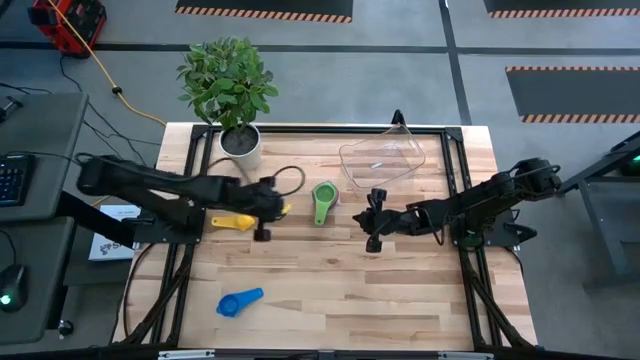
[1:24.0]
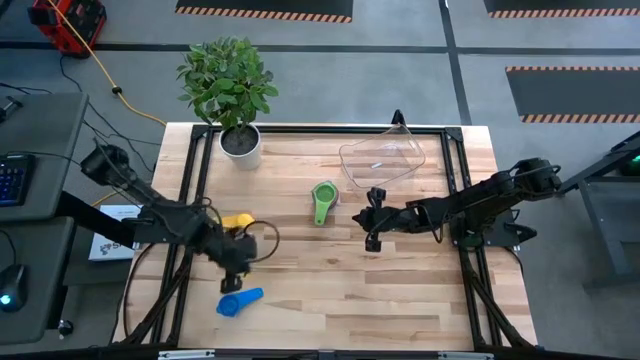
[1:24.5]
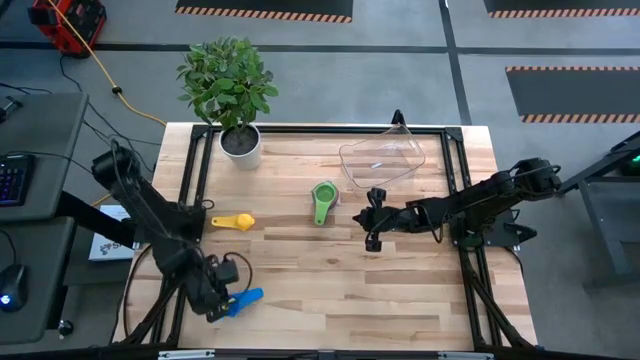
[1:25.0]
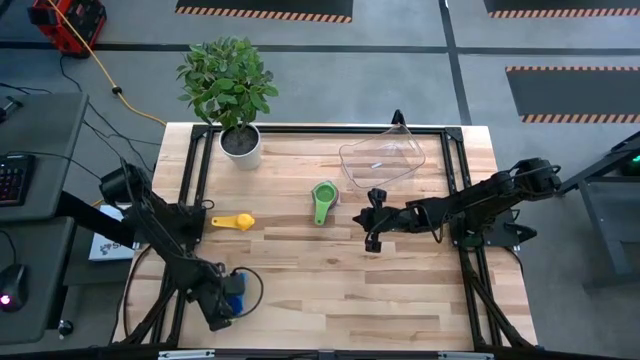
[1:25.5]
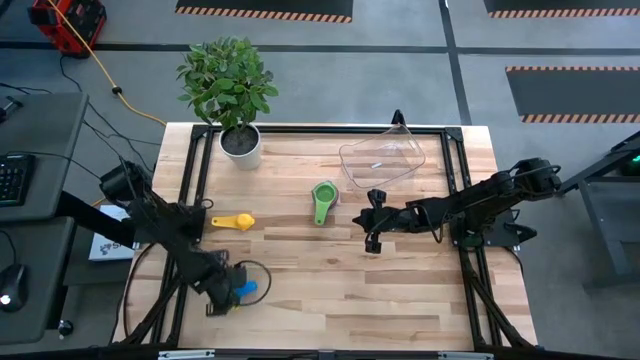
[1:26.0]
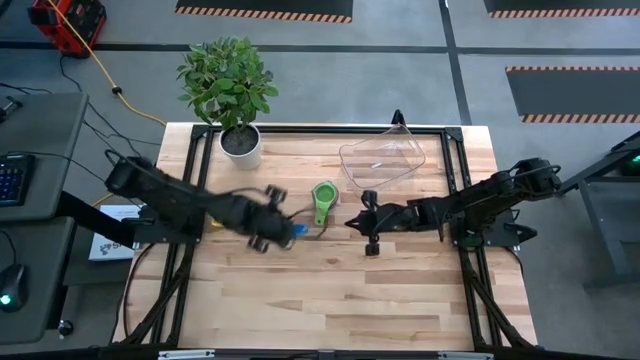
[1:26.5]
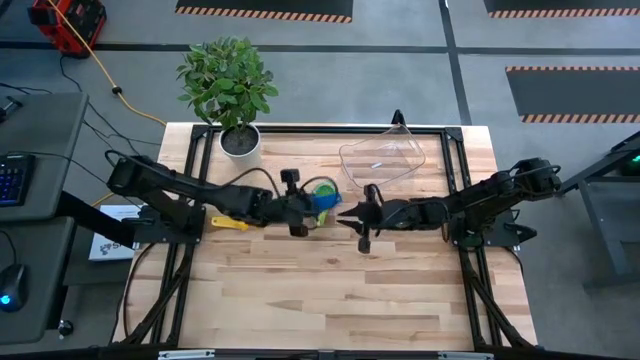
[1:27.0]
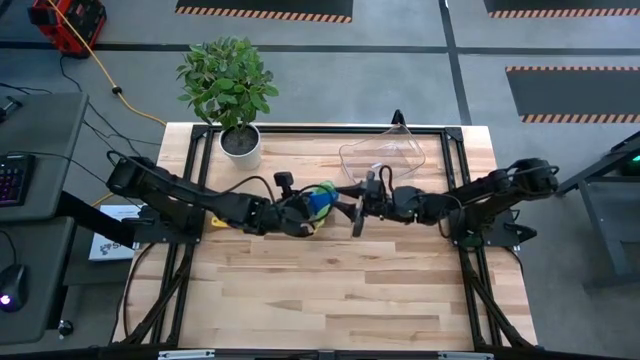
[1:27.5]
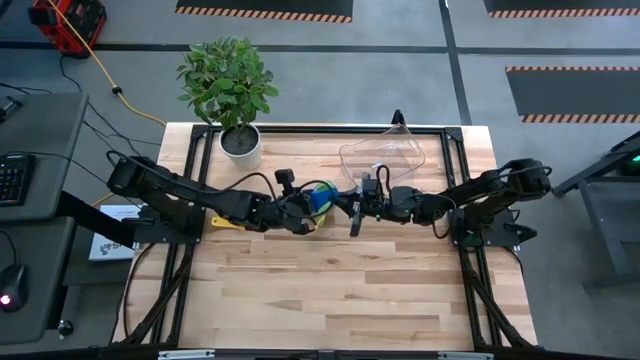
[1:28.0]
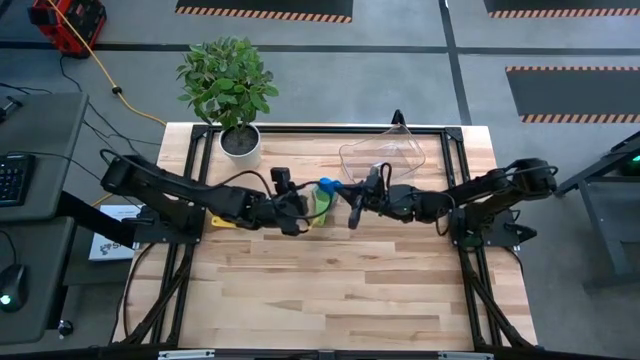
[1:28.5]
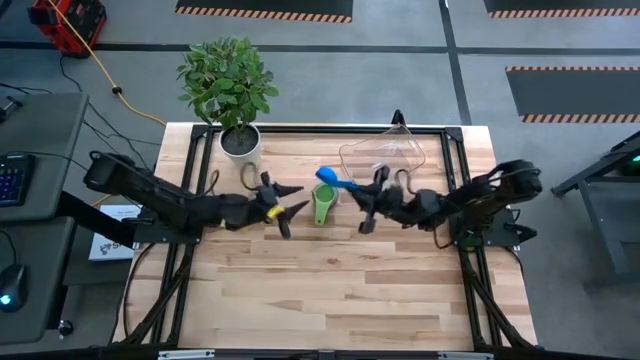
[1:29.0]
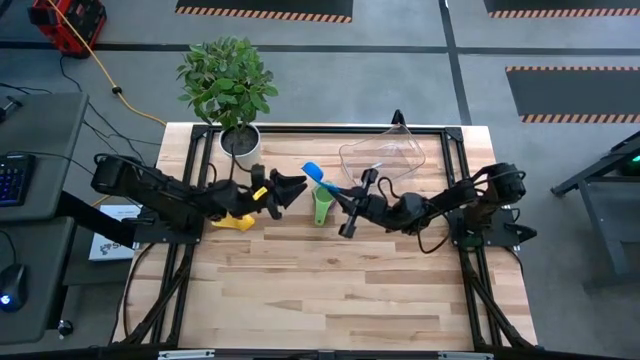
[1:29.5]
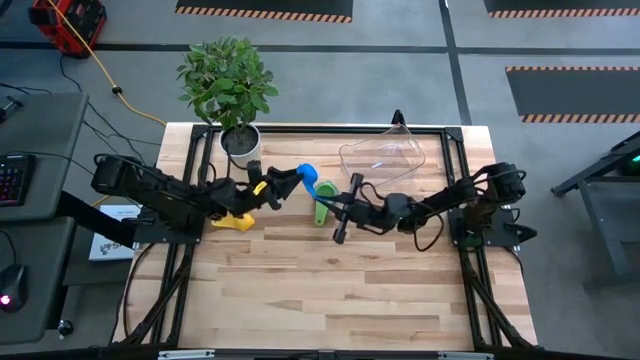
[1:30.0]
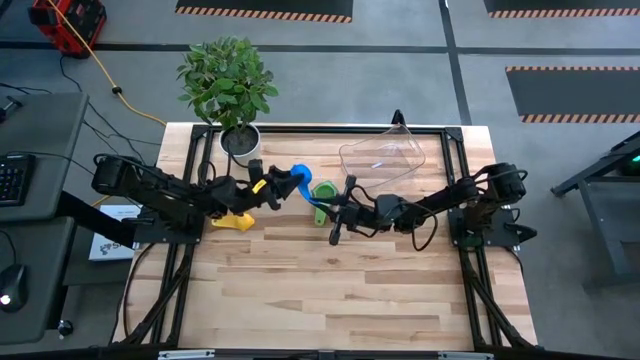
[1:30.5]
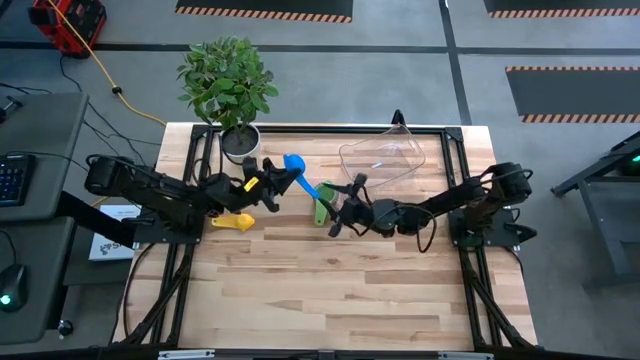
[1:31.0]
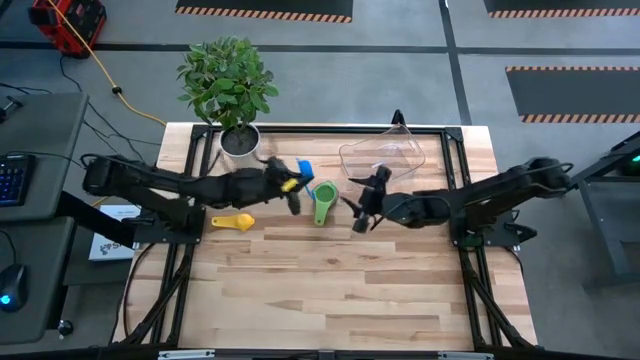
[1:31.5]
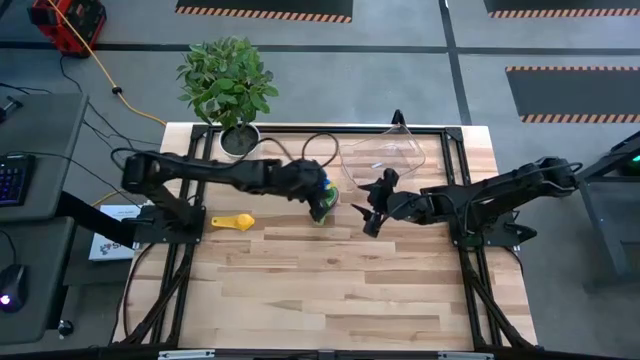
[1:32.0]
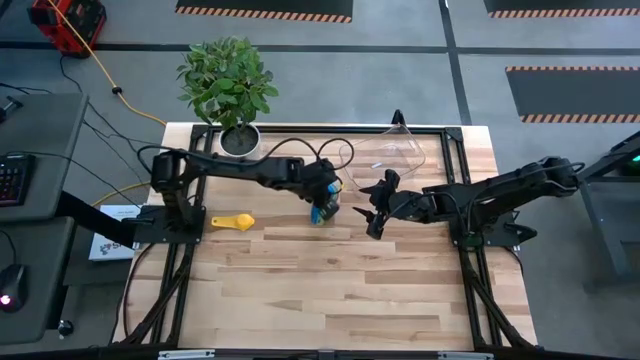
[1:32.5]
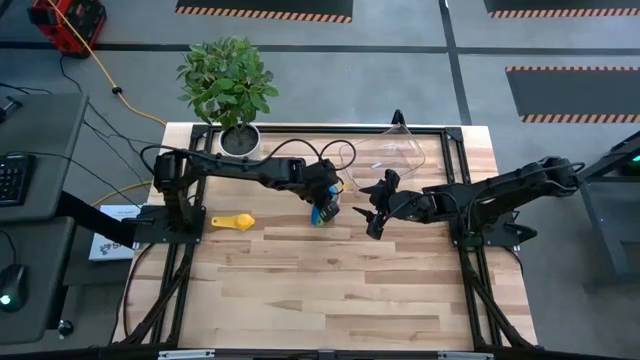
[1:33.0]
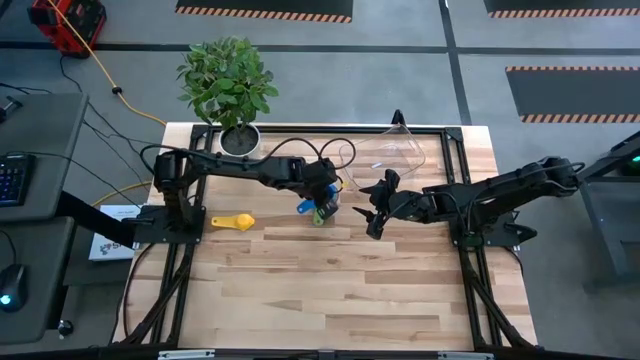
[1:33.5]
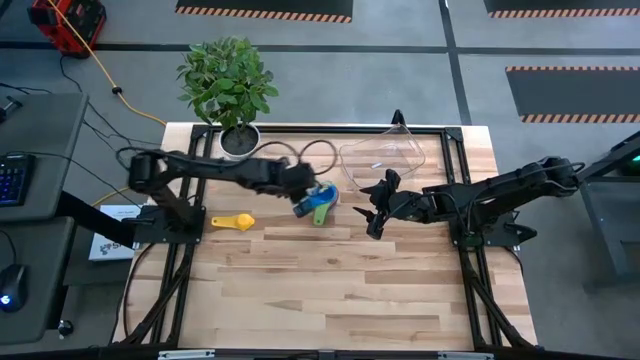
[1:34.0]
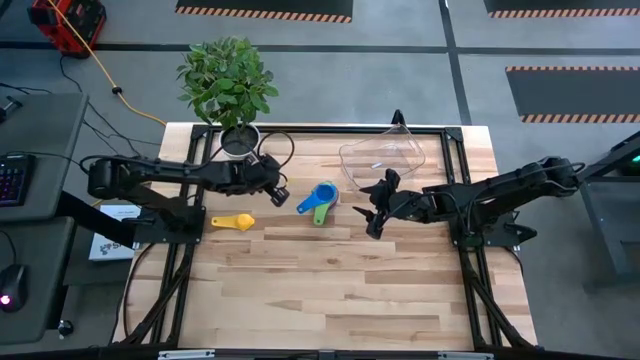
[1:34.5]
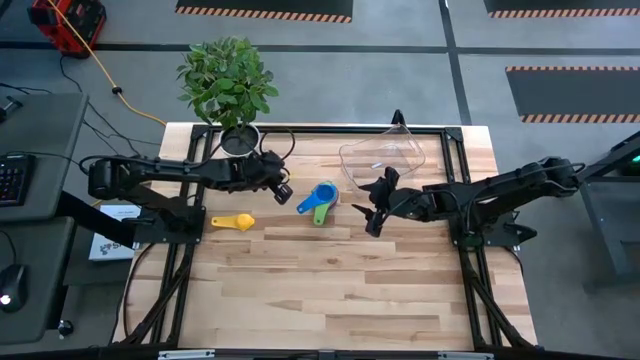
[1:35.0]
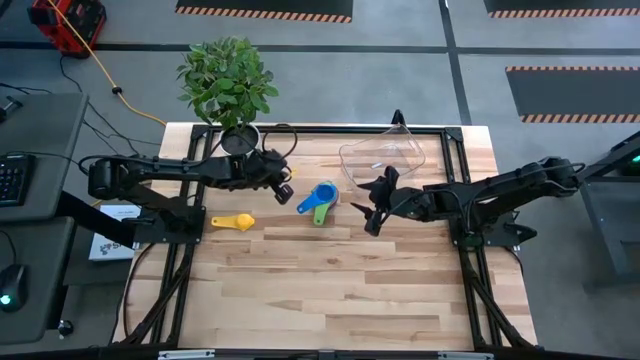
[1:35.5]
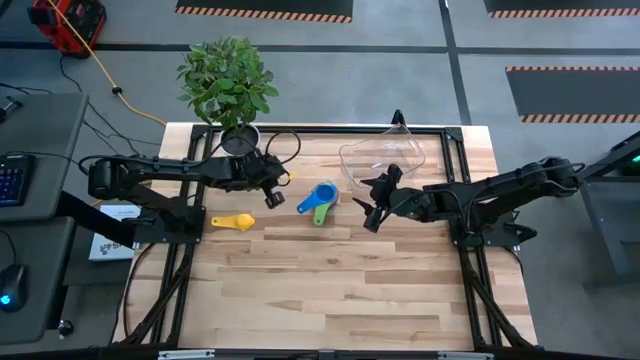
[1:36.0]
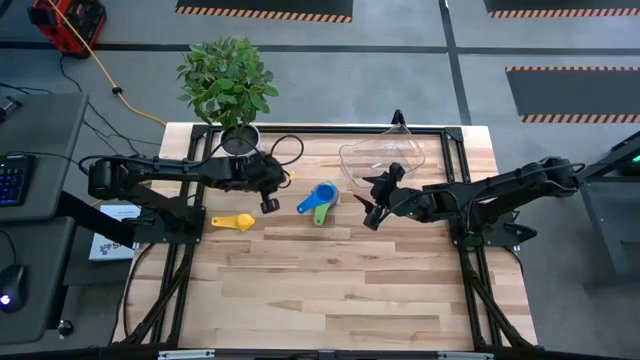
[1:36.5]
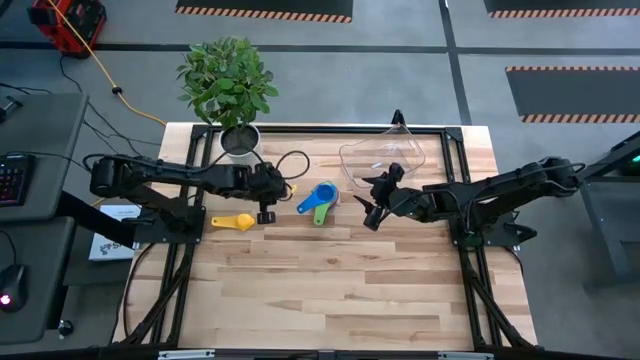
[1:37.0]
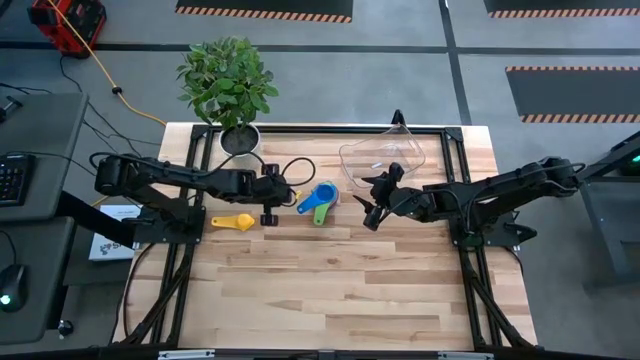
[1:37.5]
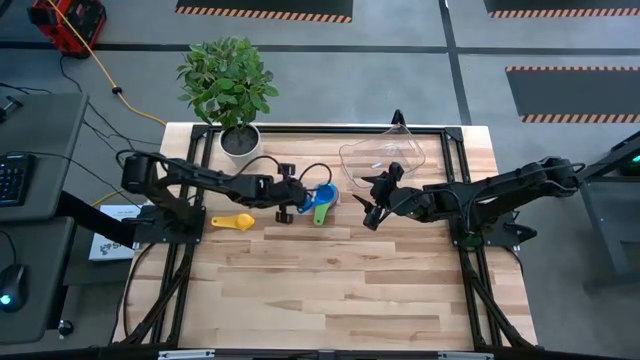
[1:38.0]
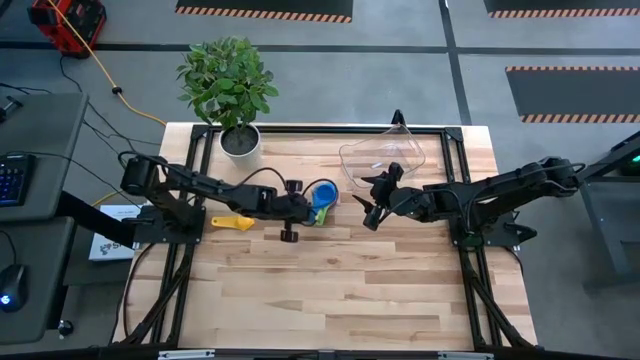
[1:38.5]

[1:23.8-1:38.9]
Task: Nest measuring cups in basket
Stack the blue measuring cup on top of the green measuring cup

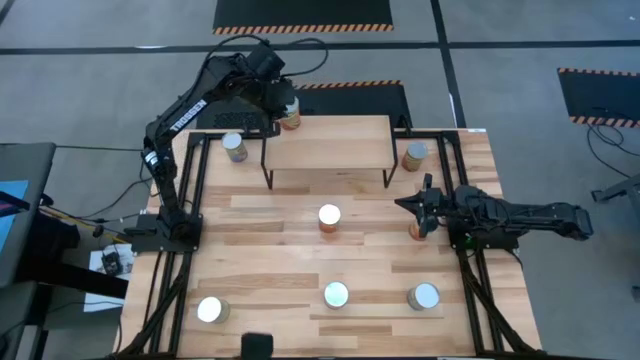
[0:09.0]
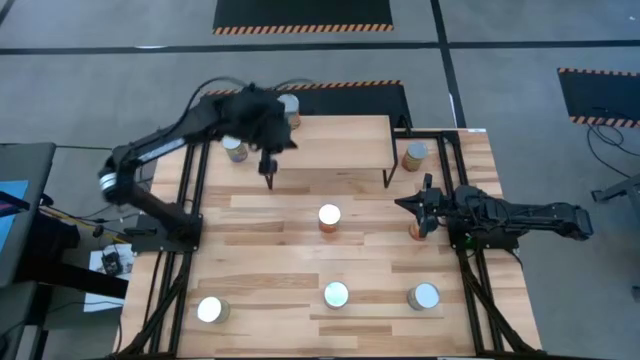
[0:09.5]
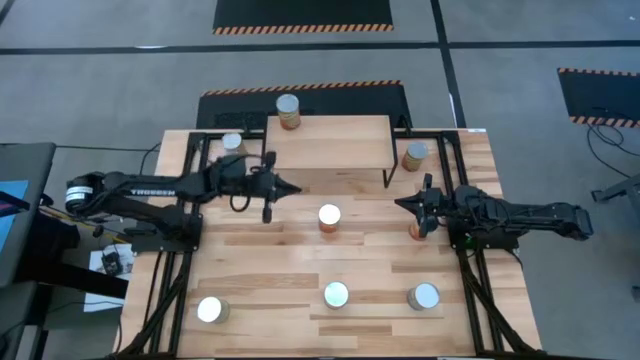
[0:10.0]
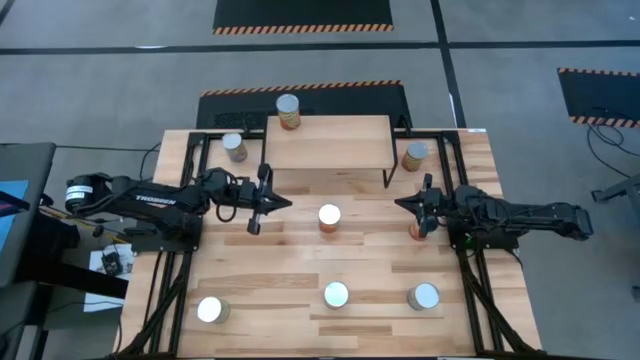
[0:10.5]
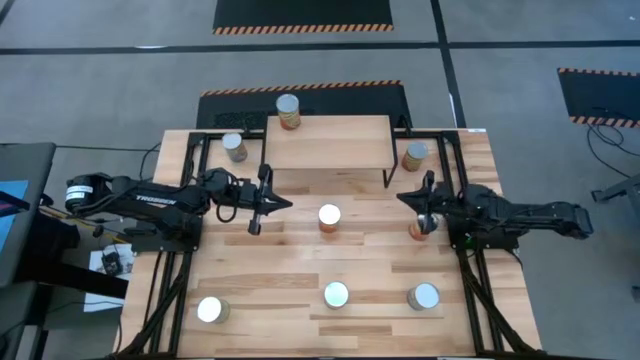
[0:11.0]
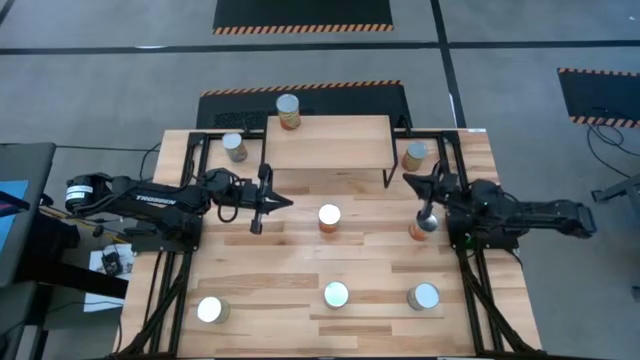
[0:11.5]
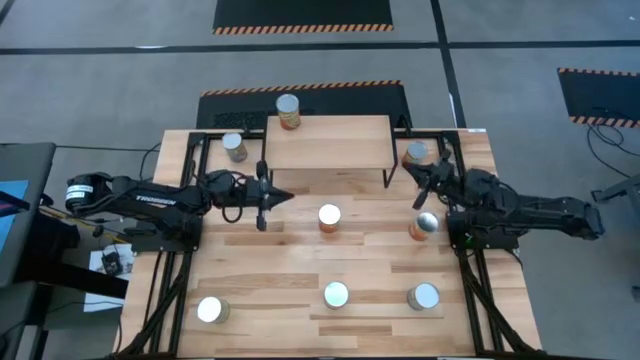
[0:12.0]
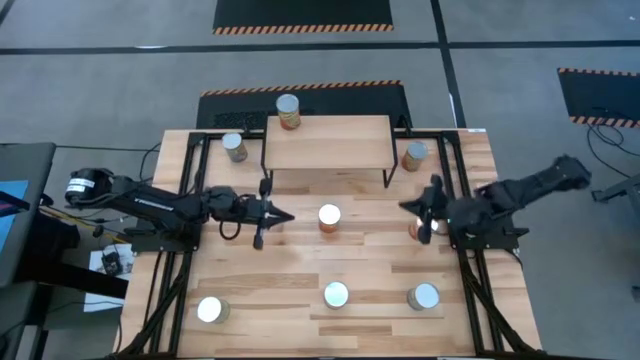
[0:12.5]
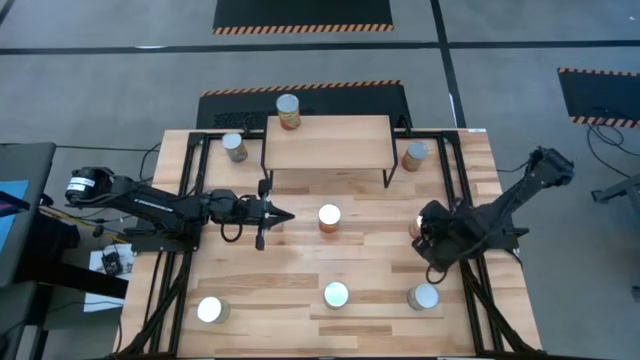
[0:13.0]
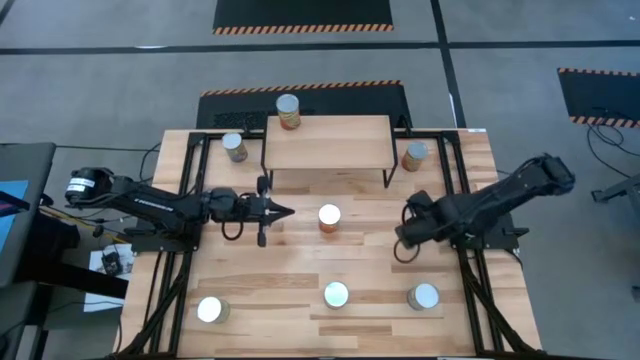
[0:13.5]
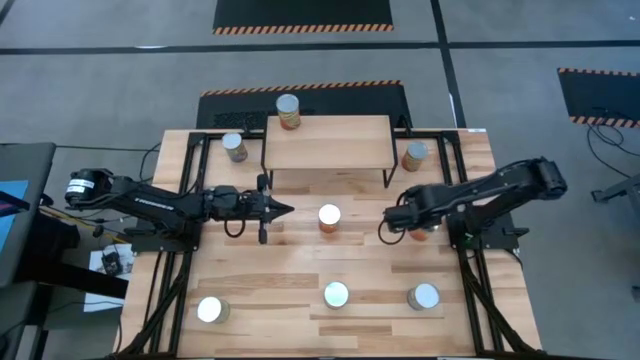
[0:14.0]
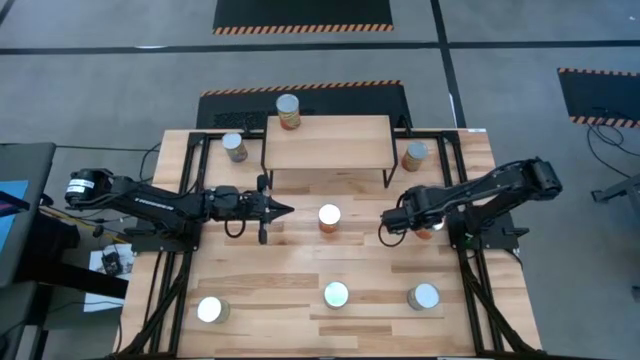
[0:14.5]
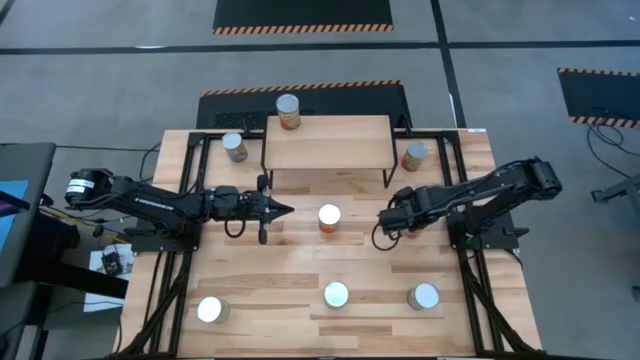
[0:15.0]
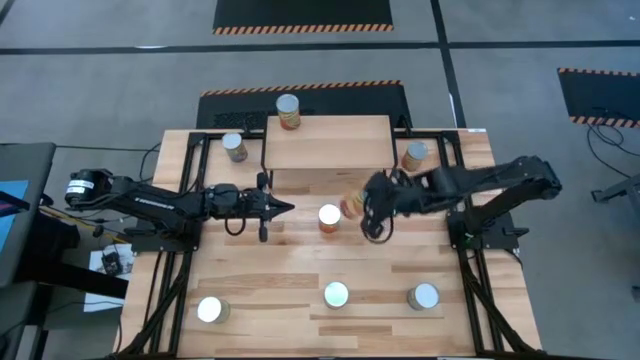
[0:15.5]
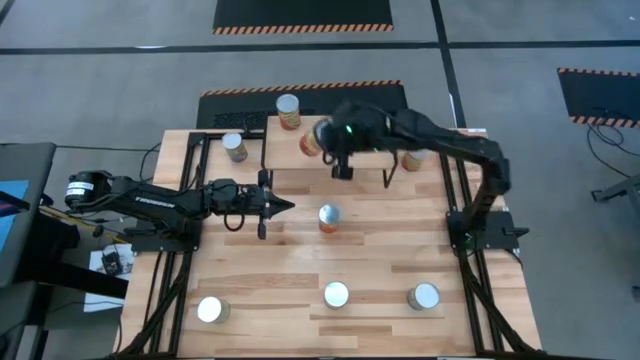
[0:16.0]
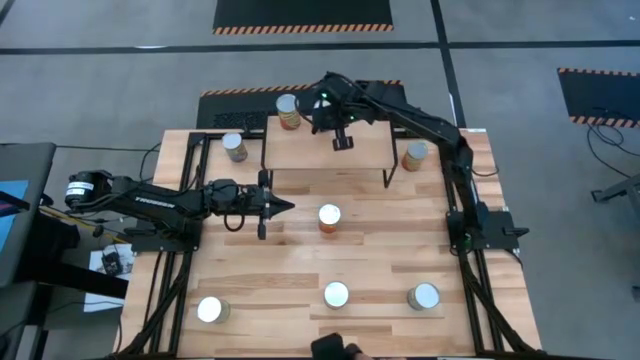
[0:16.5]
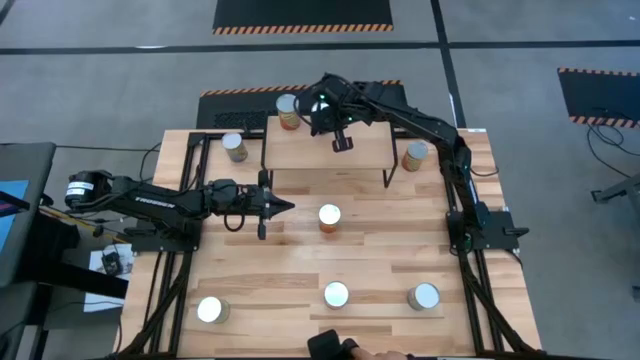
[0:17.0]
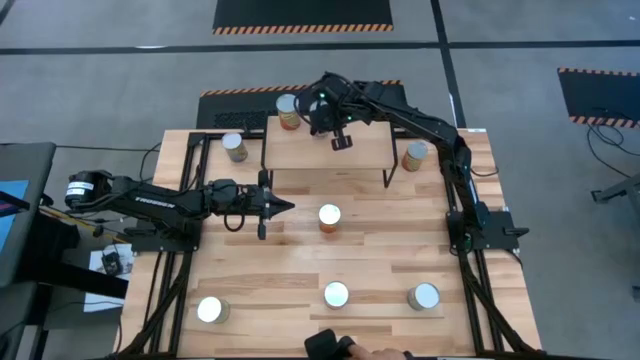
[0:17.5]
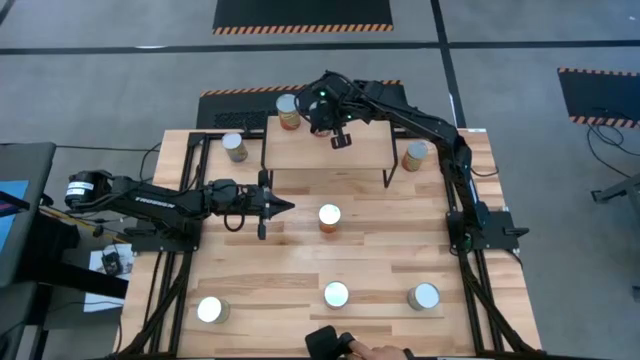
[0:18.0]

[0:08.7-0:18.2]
Task: Pick and place cans onto a shelf
Put the top canned corn on the shelf
